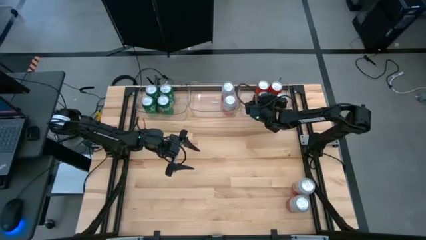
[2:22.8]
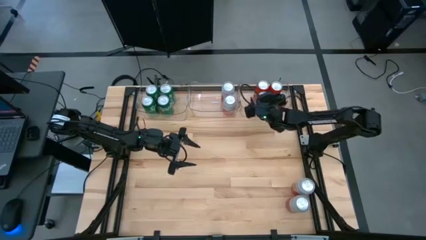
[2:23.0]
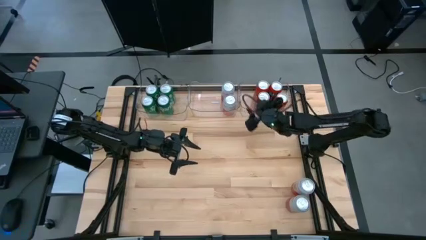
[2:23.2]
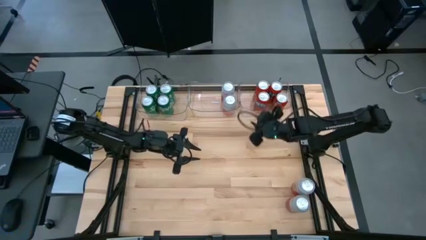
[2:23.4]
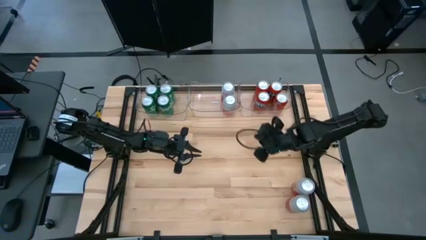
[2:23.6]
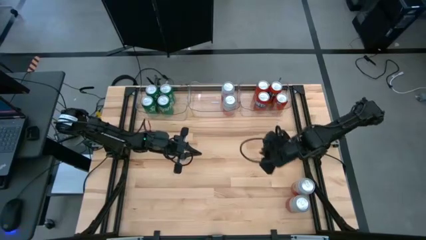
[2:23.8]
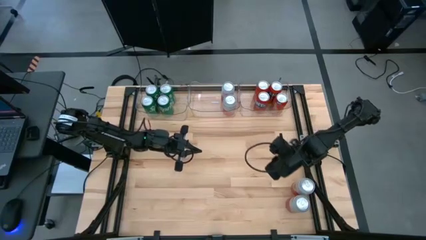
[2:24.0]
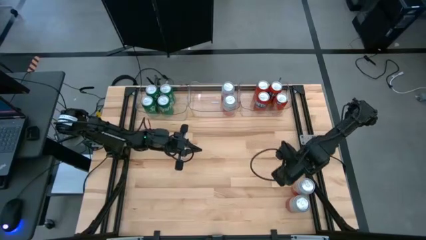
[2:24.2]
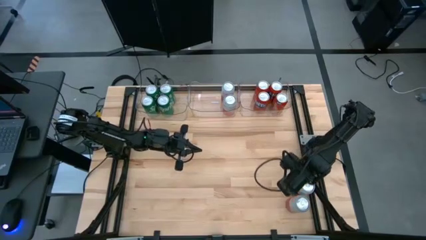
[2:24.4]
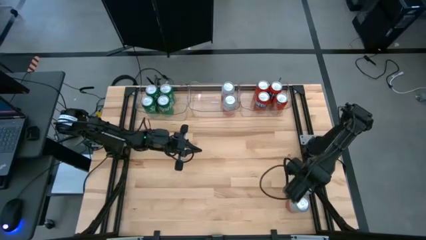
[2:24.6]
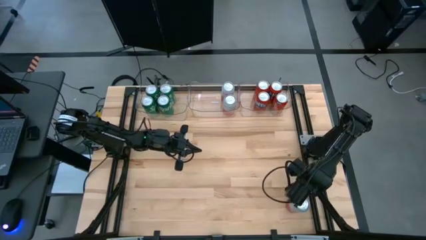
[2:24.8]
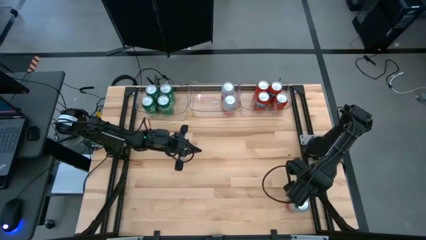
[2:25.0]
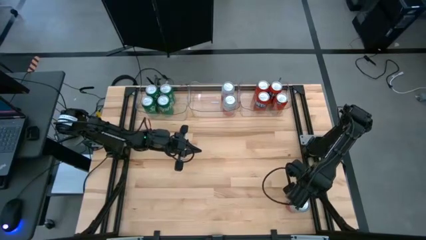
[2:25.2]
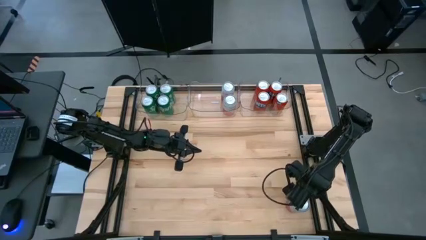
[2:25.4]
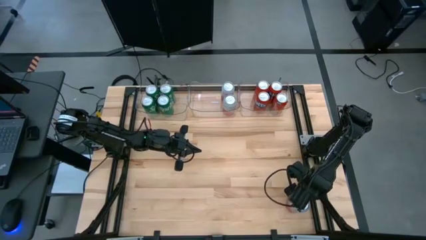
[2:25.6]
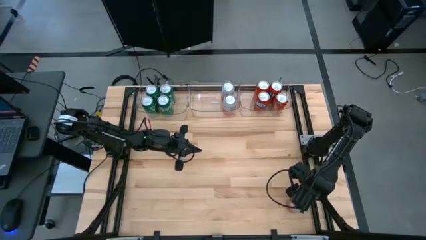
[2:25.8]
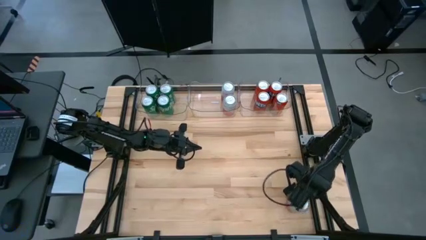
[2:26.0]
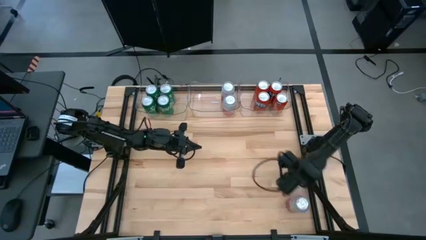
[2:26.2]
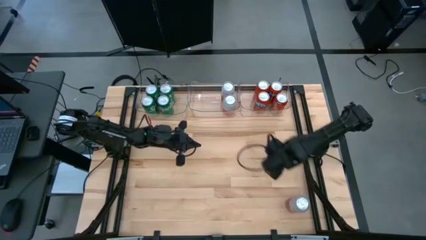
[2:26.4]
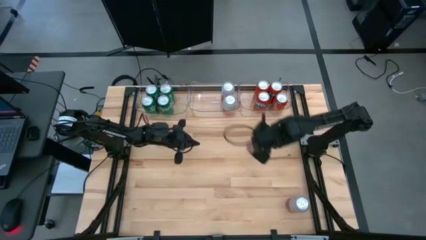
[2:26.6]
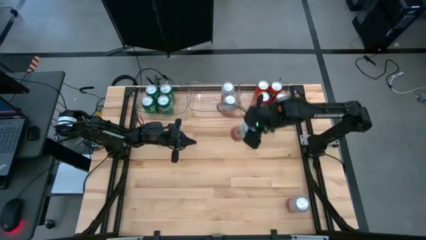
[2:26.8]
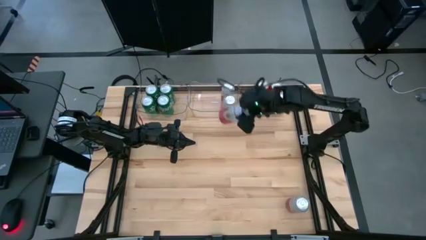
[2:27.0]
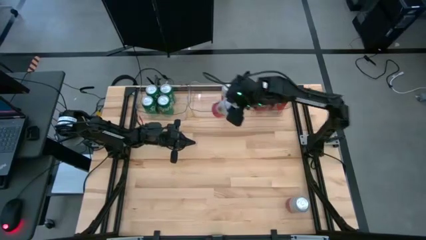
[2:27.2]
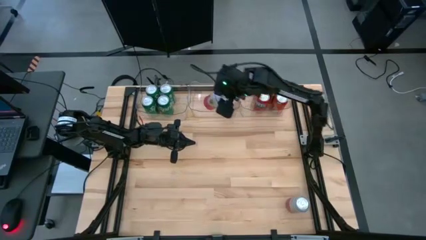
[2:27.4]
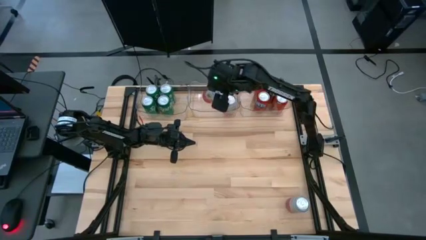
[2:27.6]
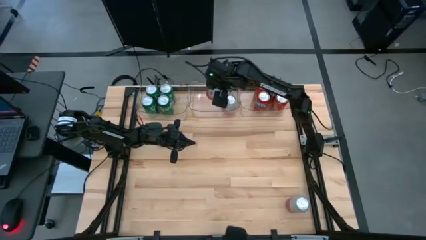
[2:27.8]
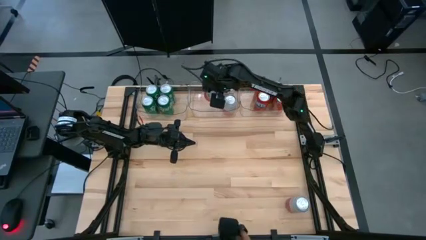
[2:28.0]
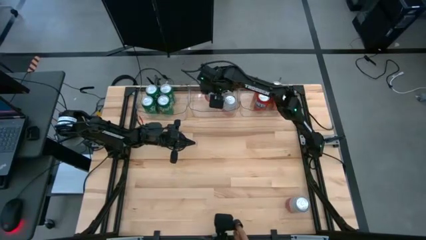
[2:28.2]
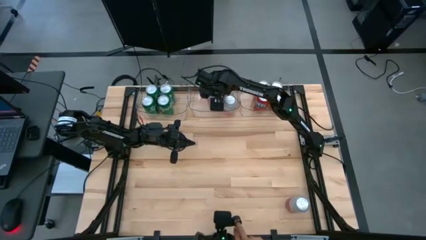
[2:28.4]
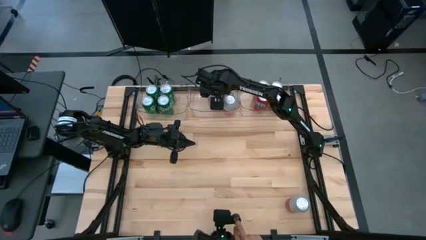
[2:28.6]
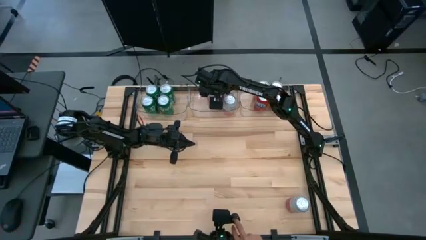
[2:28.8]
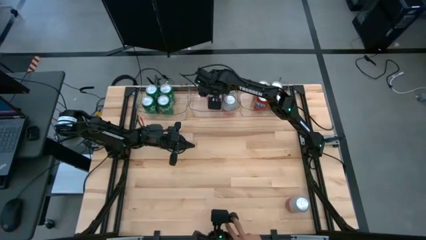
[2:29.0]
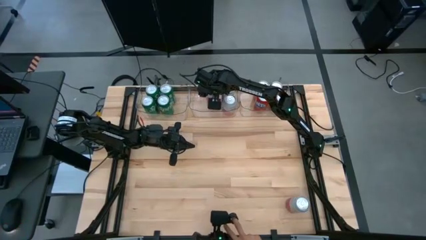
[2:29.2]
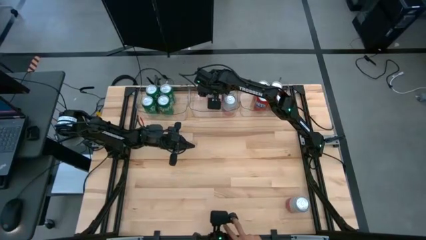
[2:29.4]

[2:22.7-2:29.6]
Task: Sort soda cans
Put the pink-white soda can into the middle transparent bin

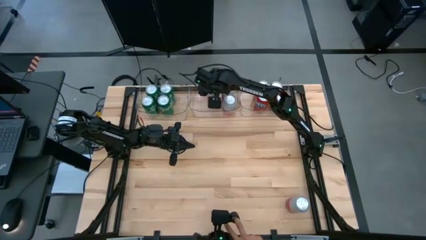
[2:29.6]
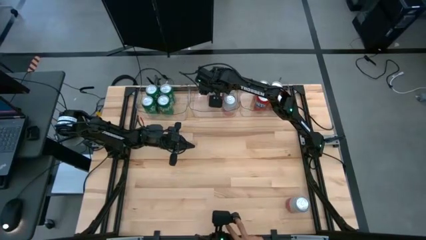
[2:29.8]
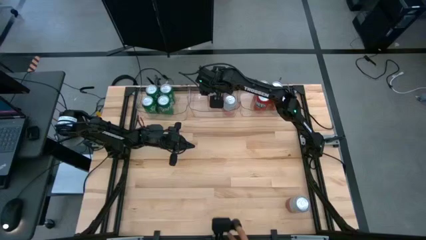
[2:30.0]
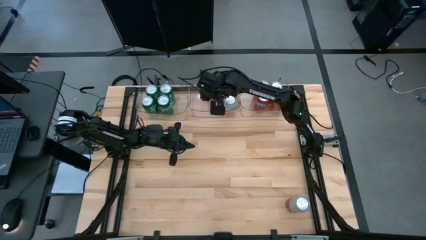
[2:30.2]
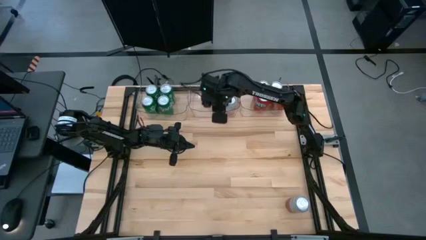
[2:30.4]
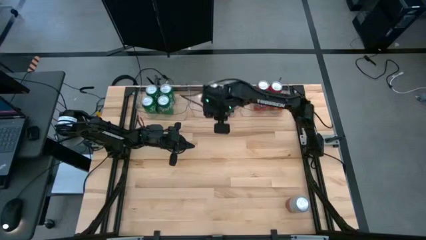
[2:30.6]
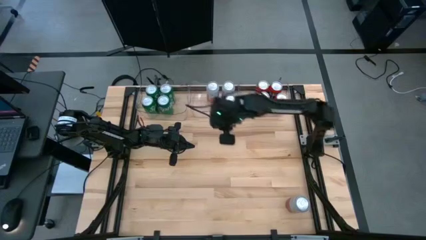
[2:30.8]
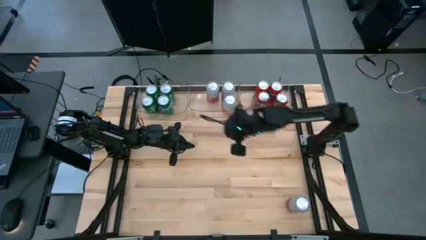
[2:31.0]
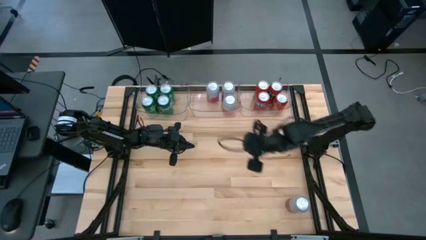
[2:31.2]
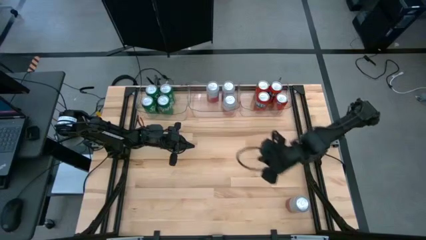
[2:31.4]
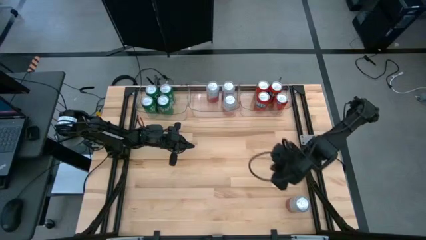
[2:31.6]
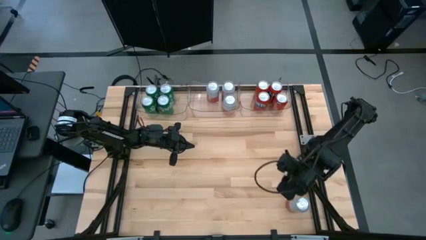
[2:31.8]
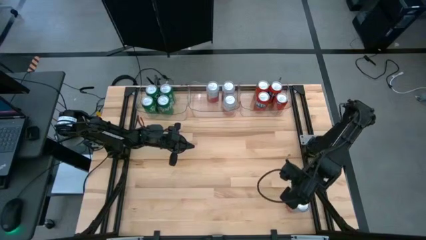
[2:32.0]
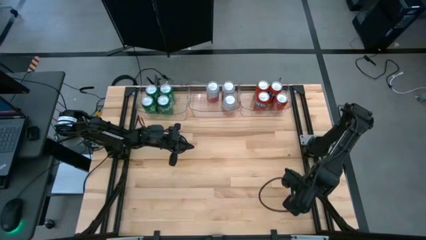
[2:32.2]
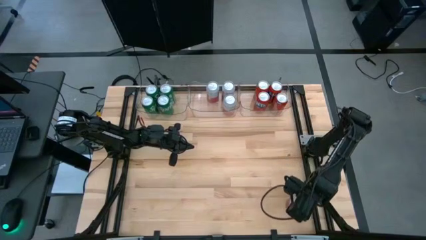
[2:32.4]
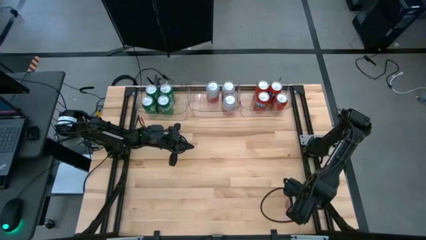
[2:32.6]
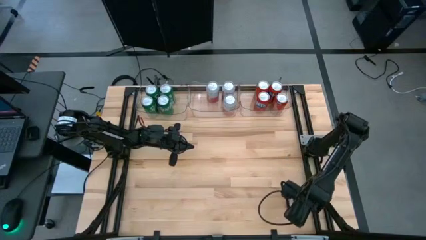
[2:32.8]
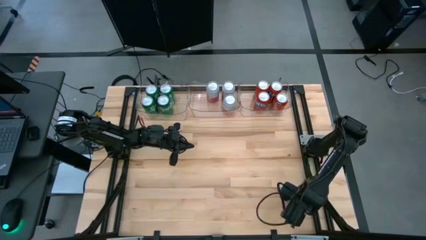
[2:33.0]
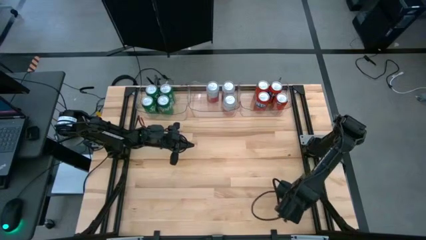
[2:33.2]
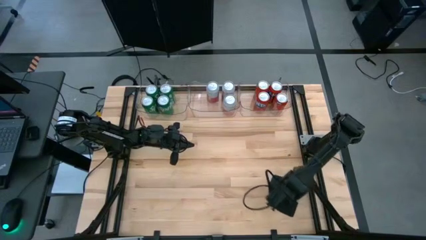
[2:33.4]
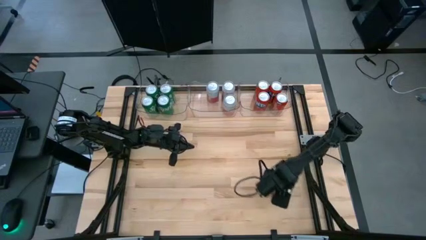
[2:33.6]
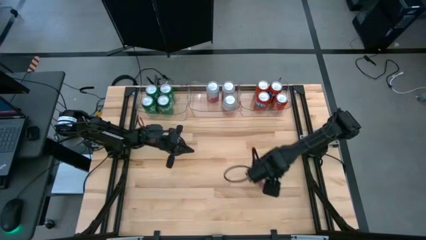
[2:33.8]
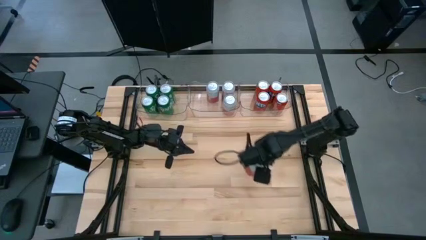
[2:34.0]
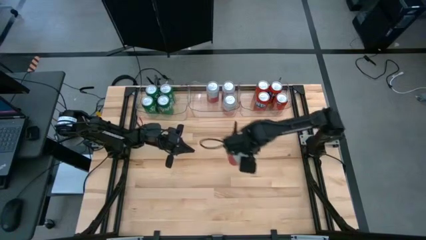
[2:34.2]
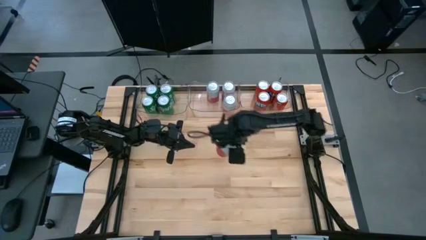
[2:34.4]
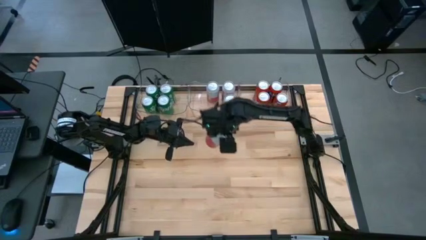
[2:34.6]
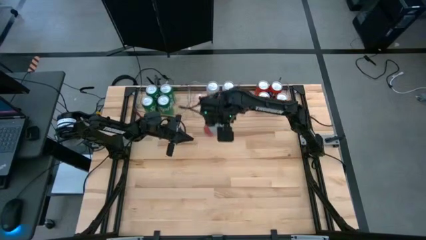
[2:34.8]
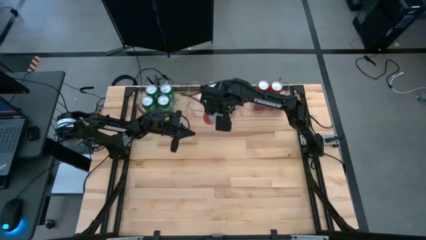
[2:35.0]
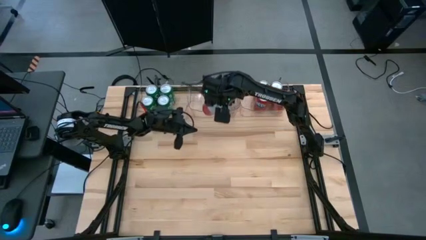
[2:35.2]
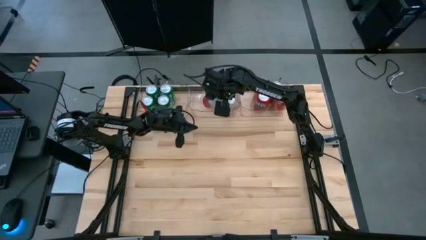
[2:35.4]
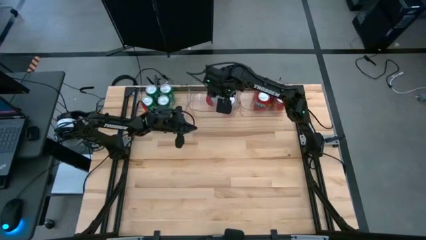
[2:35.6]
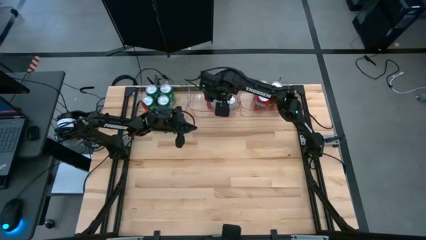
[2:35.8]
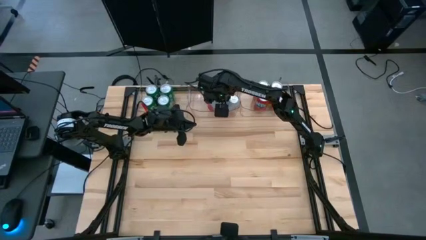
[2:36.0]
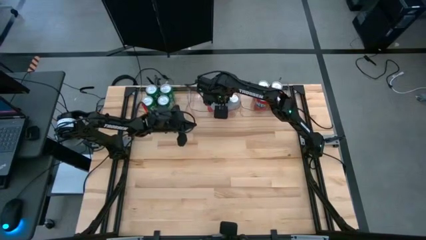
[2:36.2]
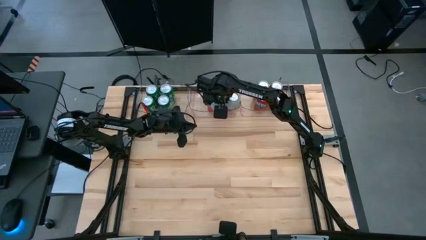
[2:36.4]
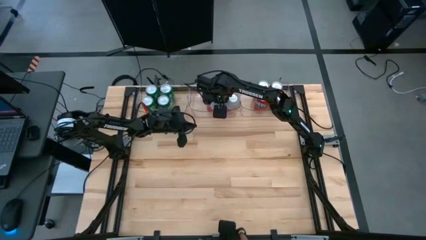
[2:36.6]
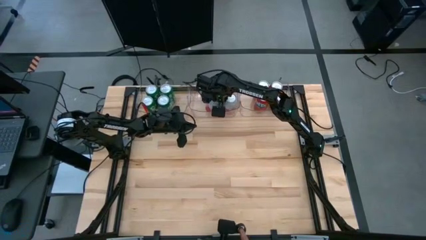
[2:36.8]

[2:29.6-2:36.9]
Put the pink-white soda can into the middle transparent bin
